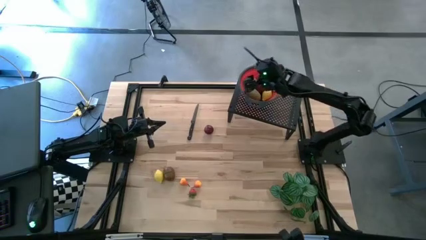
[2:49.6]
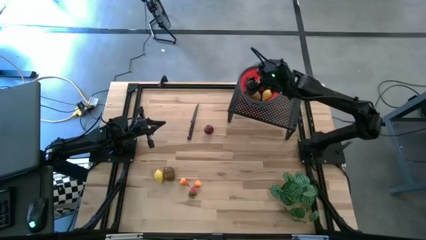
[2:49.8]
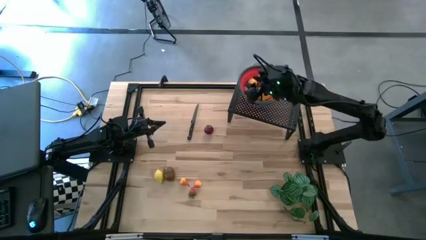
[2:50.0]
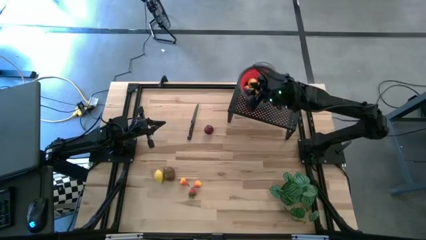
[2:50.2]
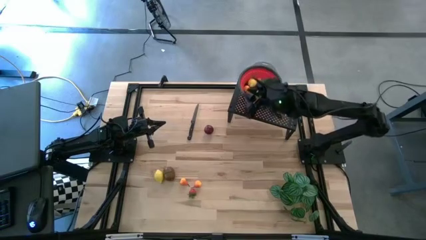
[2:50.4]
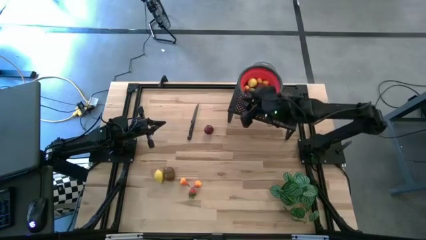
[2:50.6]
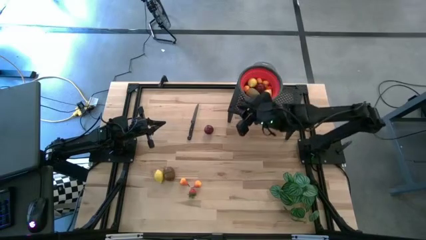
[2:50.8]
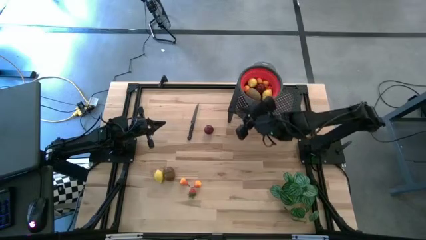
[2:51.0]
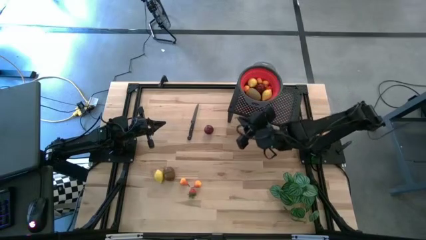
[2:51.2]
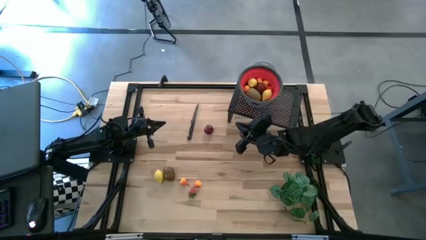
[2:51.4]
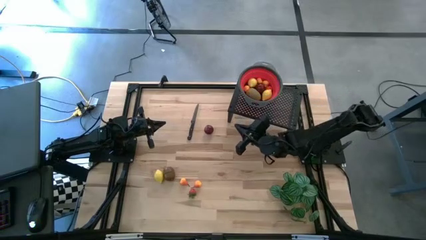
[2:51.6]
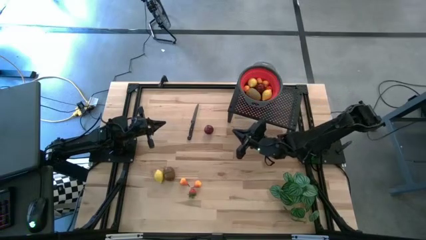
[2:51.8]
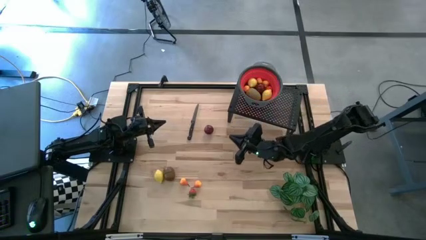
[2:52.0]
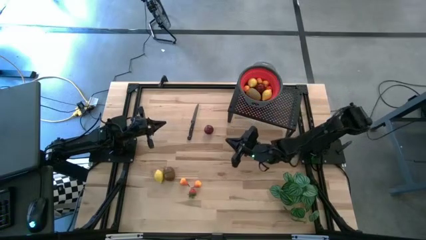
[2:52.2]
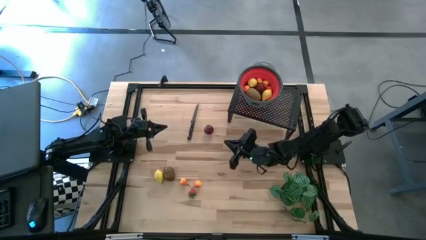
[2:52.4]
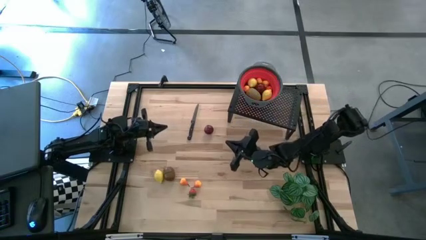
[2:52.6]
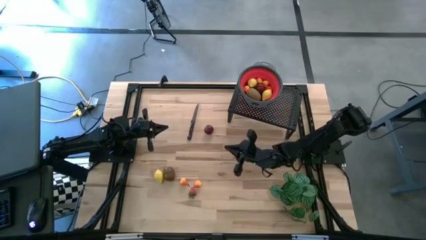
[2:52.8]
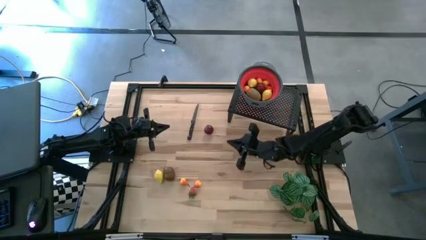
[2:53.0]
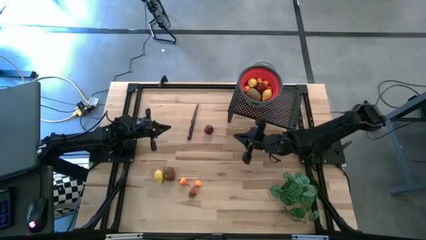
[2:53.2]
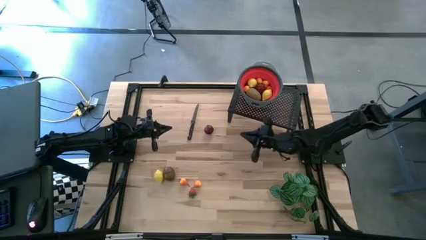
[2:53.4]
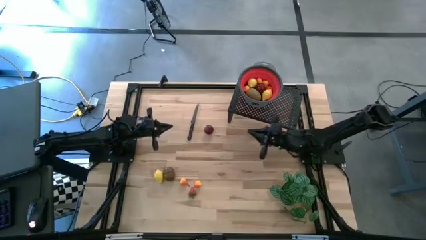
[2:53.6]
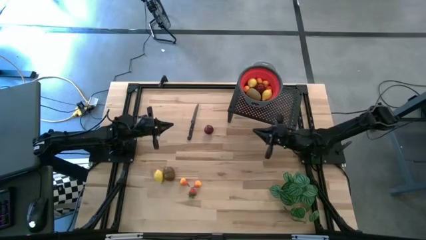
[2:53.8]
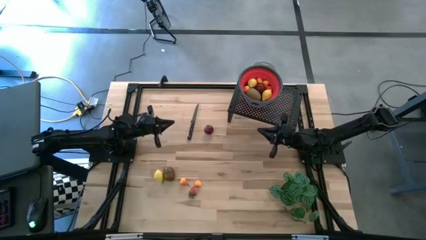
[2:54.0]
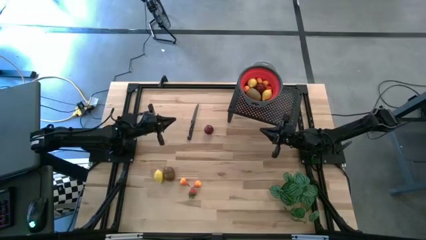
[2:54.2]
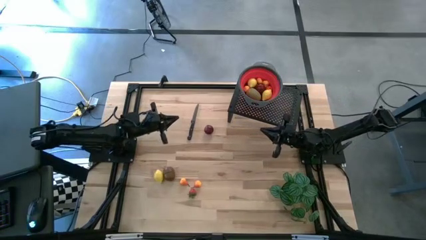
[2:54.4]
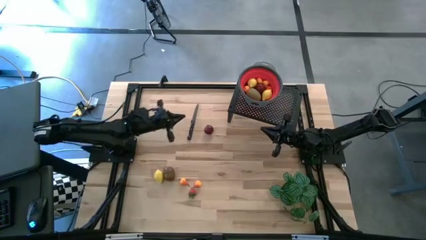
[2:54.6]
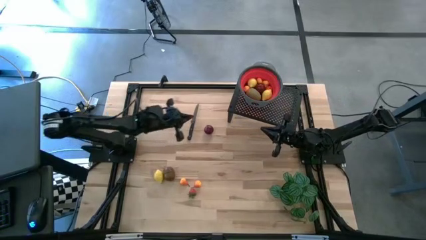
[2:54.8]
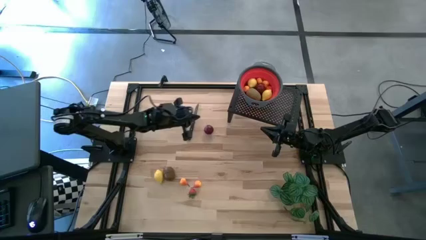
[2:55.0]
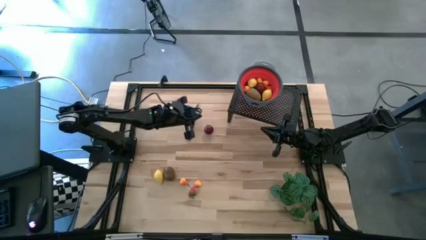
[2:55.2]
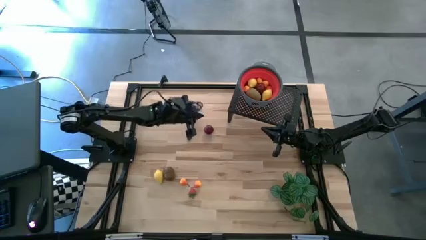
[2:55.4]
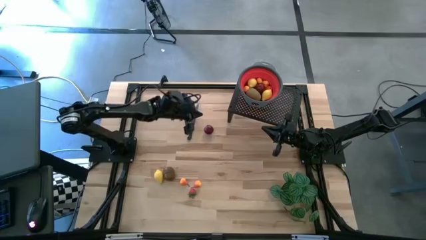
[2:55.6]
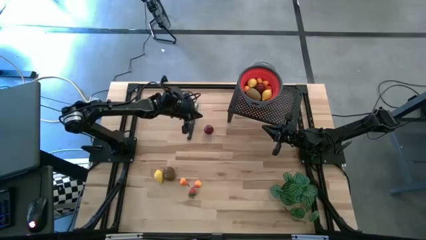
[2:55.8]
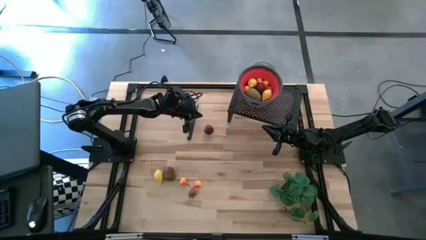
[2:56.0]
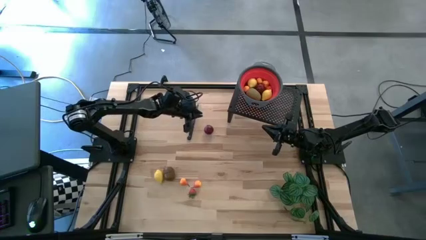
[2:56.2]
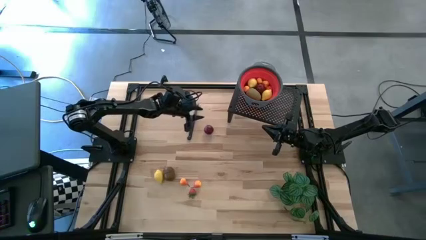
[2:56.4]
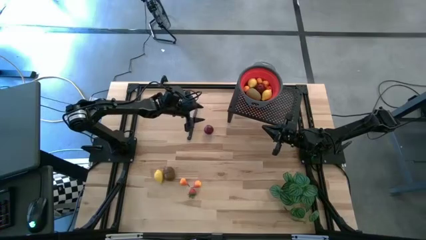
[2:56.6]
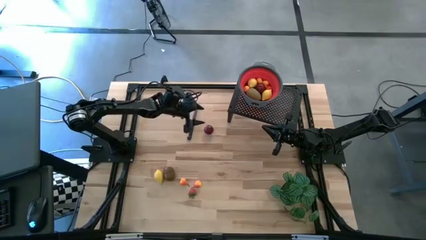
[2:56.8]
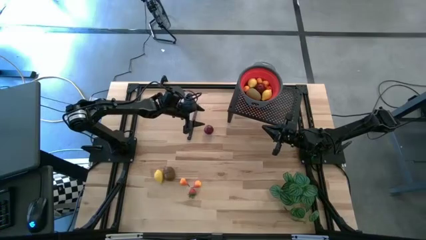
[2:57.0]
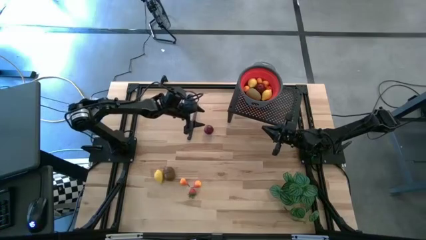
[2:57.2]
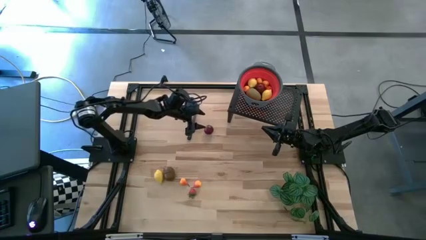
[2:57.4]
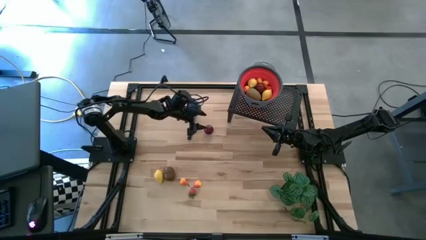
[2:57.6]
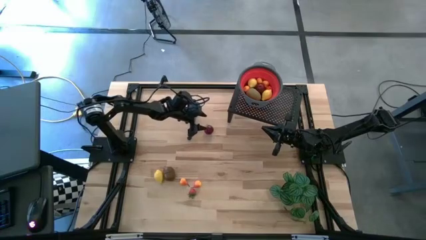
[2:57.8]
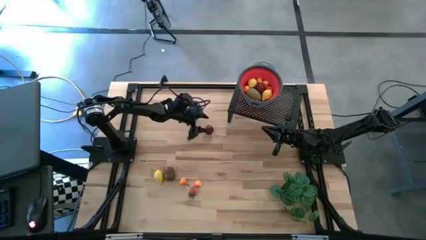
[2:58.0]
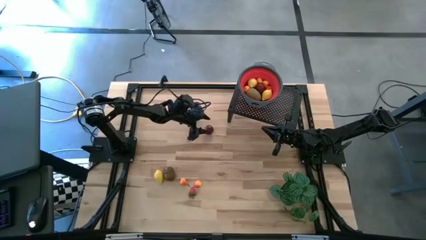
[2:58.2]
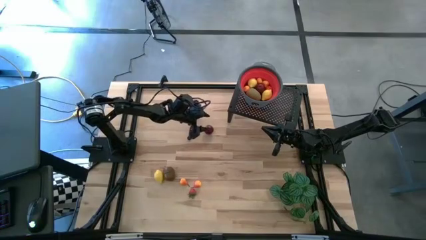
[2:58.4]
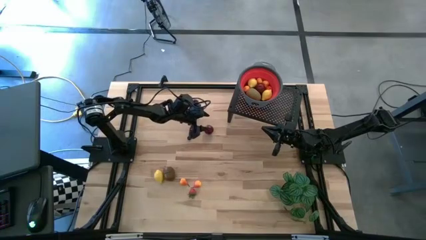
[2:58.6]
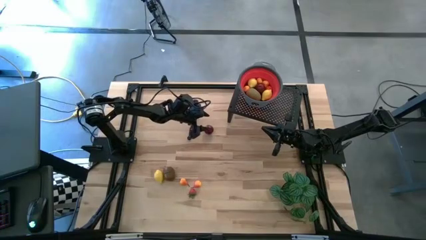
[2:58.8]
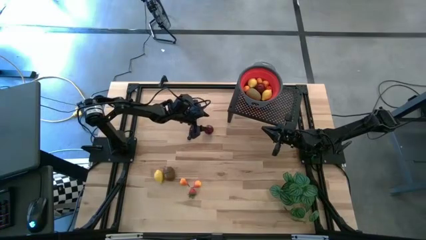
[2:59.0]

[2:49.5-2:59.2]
Task: Pick & Place Fruit
Put the red pomegranate into the red strainer bowl on the shelf

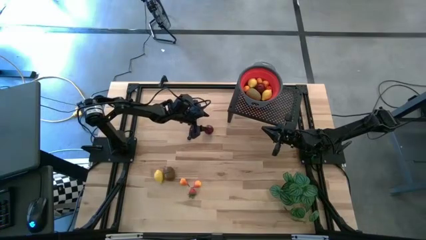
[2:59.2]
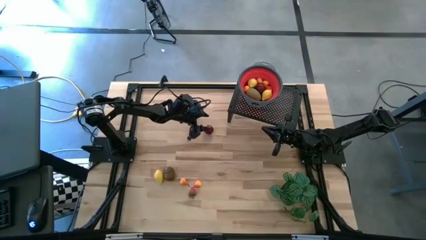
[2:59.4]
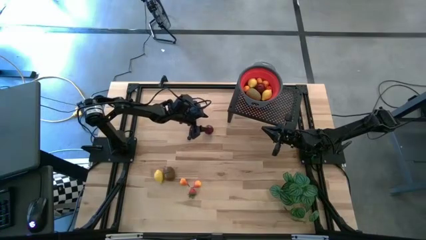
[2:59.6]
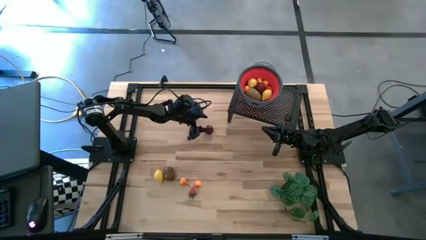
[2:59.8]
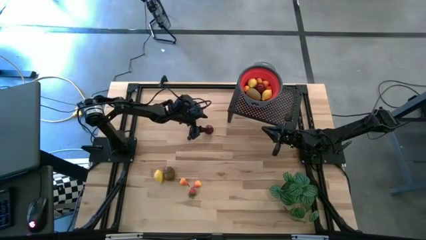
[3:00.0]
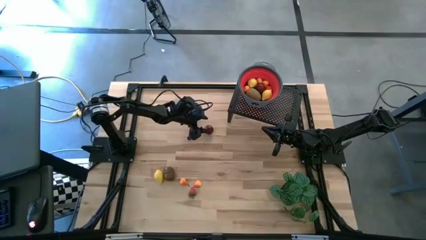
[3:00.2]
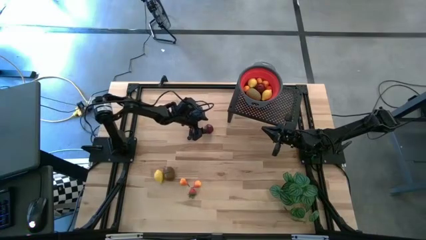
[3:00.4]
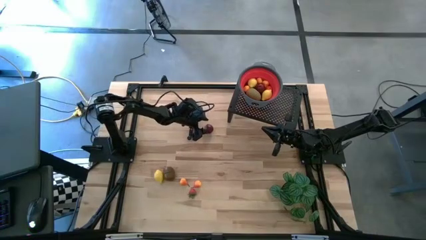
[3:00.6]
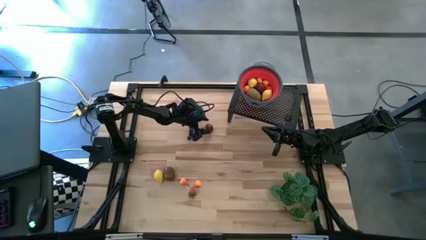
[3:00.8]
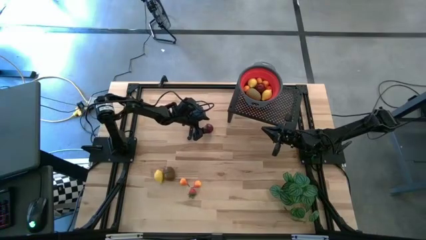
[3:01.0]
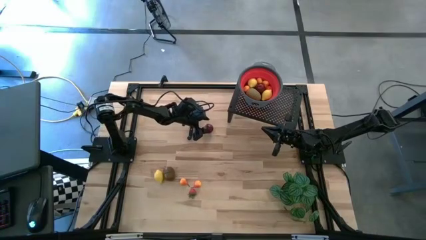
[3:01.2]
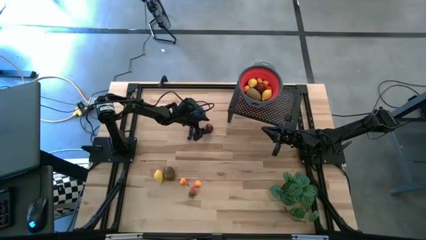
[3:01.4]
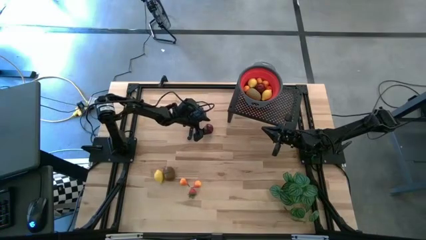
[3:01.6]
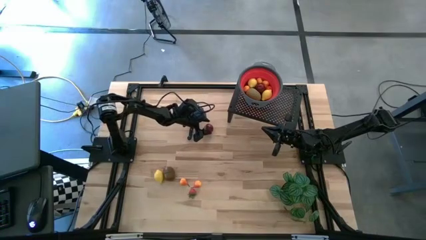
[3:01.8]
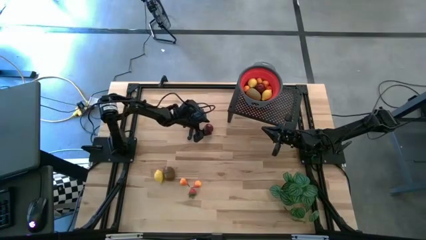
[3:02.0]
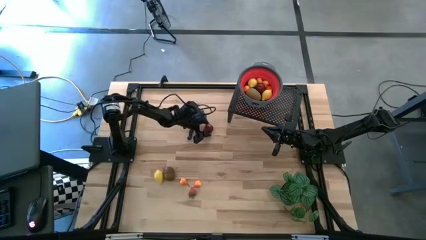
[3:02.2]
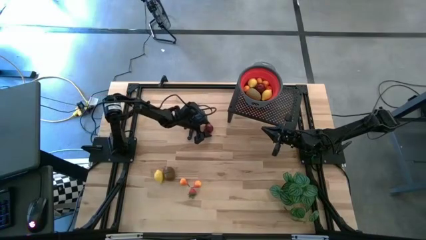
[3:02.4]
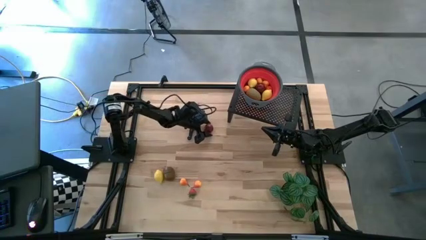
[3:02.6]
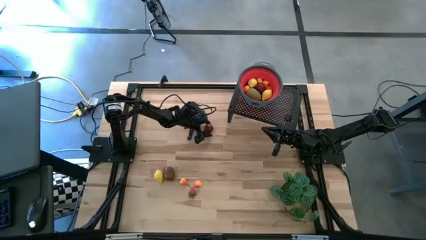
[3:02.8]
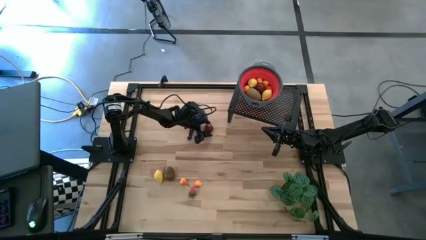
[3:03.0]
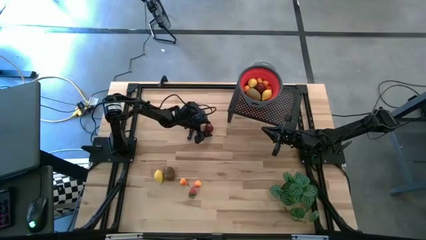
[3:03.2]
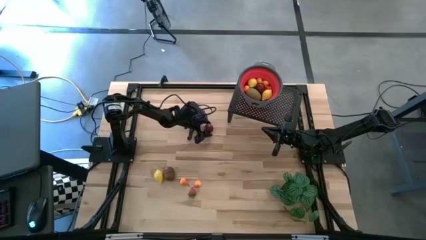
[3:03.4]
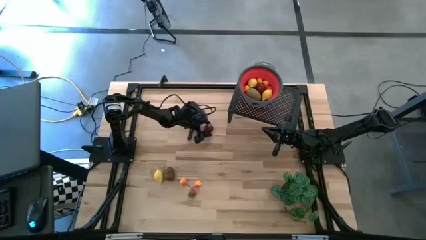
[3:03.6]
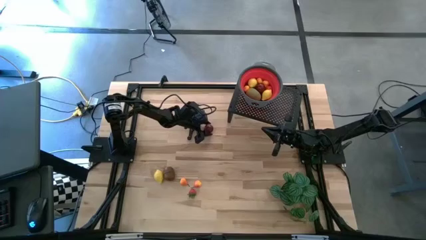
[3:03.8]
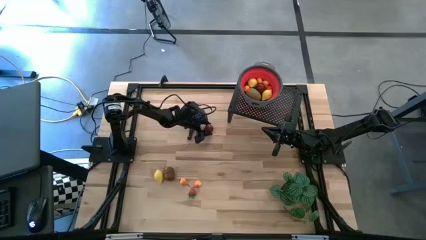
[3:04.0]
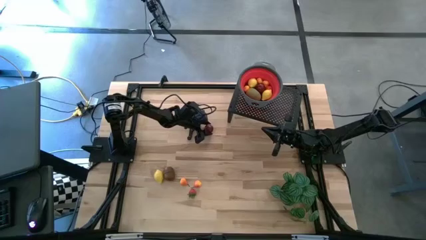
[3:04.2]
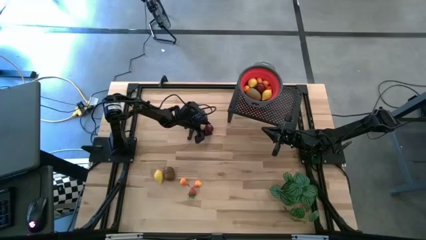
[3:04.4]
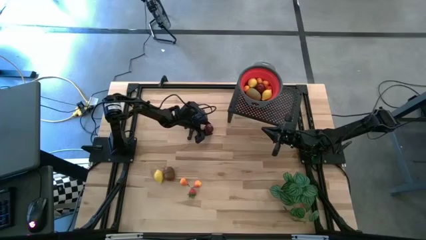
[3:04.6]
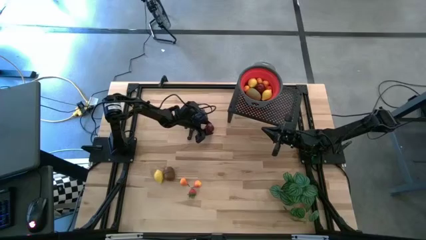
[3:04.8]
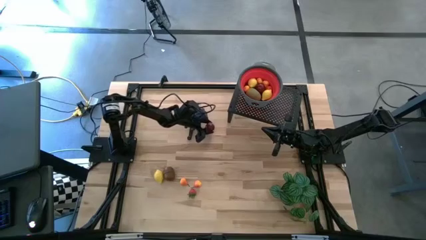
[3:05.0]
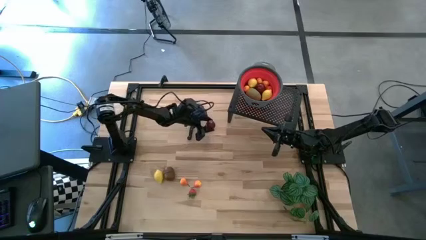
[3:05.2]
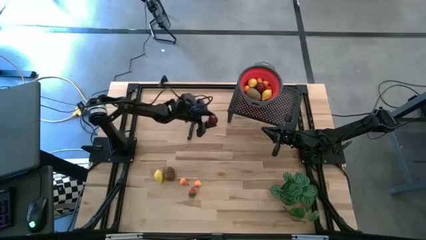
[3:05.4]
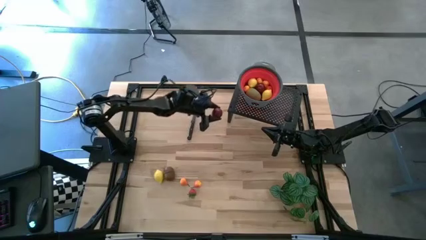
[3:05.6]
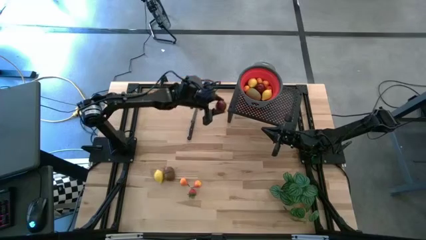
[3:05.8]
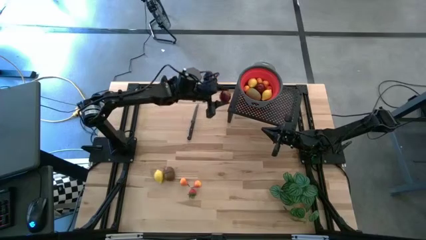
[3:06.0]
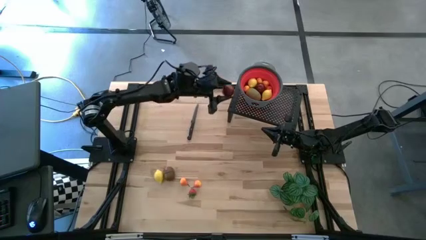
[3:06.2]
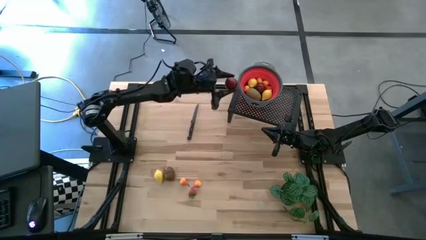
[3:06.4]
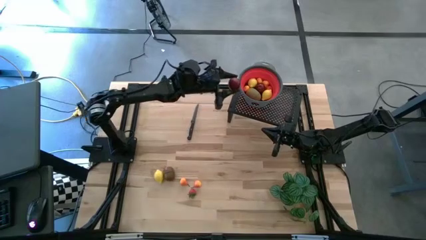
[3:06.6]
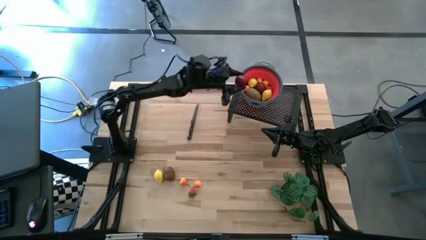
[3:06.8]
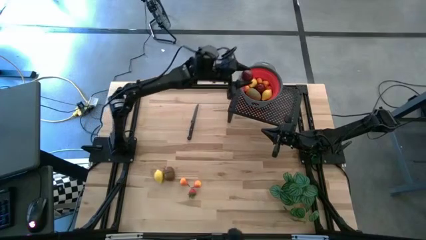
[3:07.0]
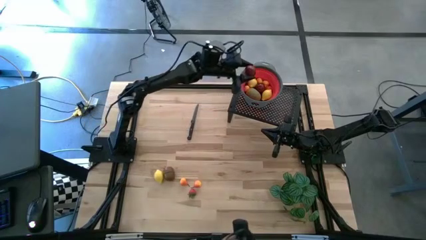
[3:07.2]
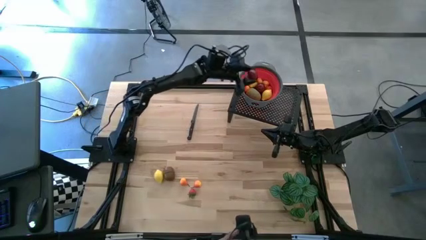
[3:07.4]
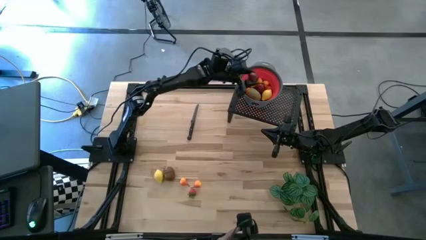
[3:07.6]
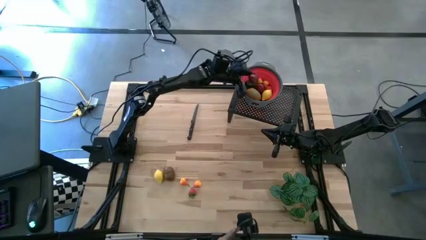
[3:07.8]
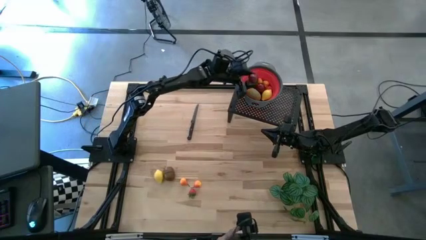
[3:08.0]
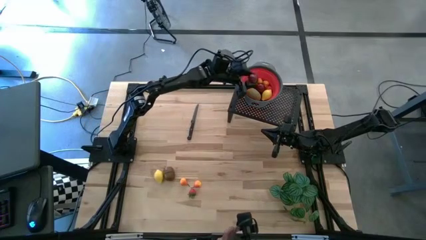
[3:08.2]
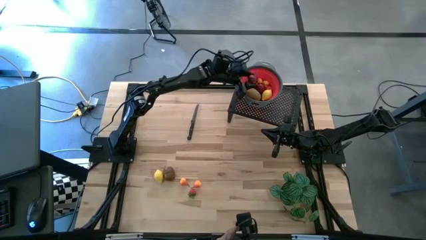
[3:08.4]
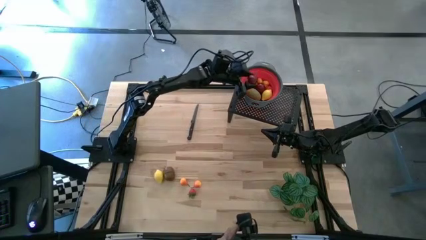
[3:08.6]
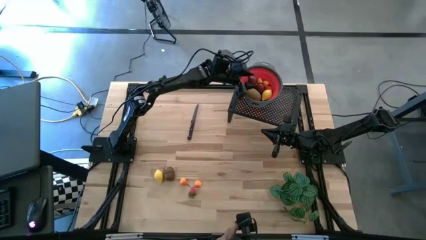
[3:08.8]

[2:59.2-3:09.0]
Put the red pomegranate into the red strainer bowl on the shelf
